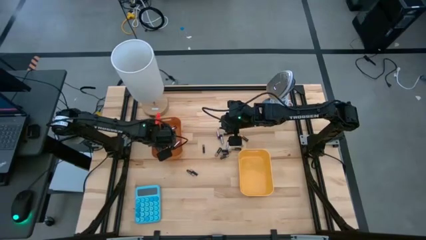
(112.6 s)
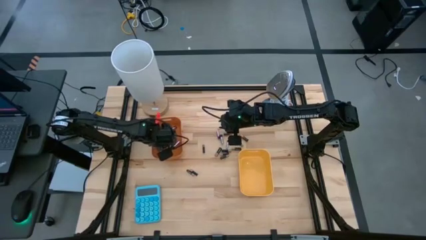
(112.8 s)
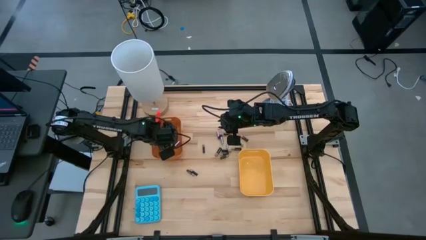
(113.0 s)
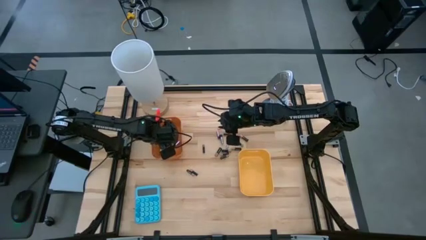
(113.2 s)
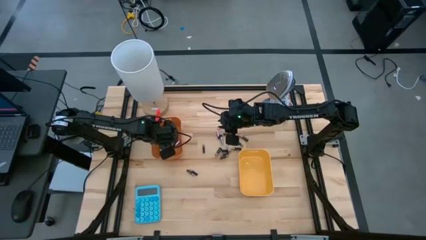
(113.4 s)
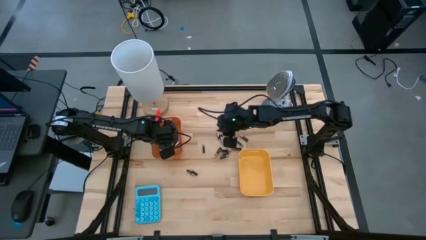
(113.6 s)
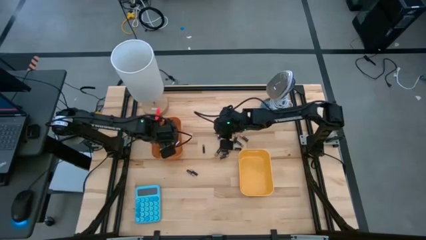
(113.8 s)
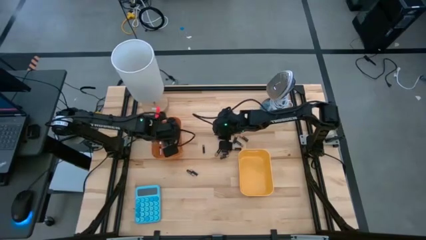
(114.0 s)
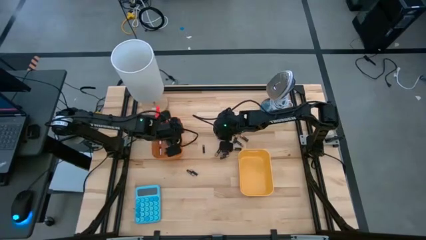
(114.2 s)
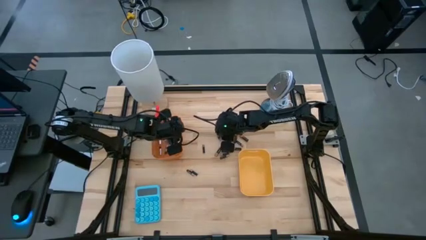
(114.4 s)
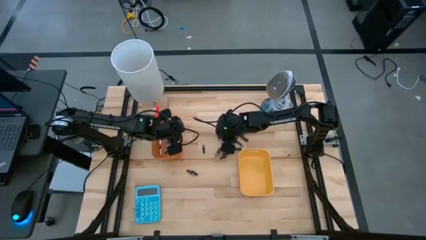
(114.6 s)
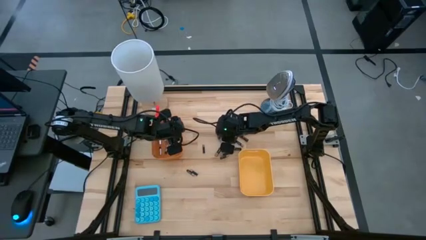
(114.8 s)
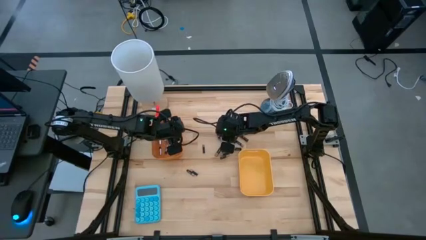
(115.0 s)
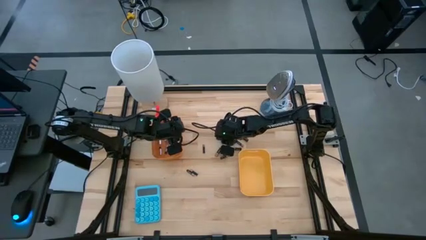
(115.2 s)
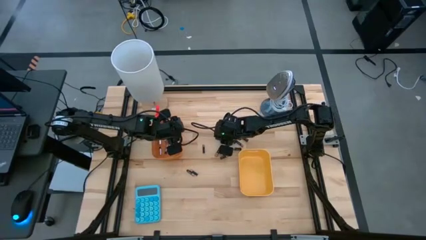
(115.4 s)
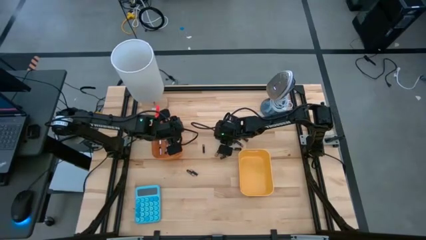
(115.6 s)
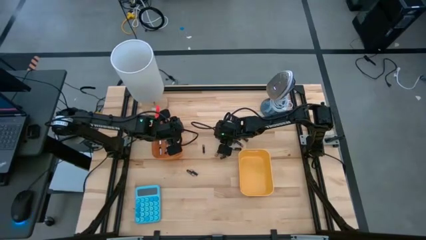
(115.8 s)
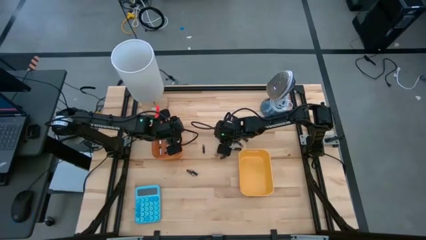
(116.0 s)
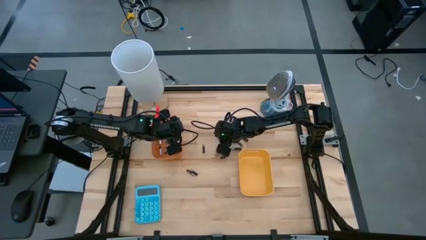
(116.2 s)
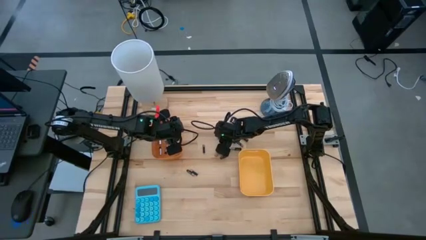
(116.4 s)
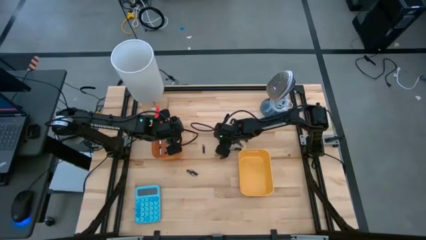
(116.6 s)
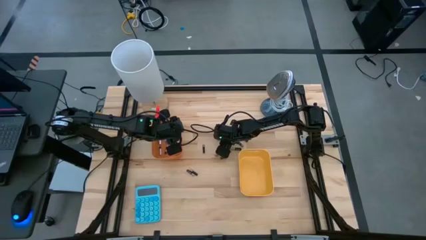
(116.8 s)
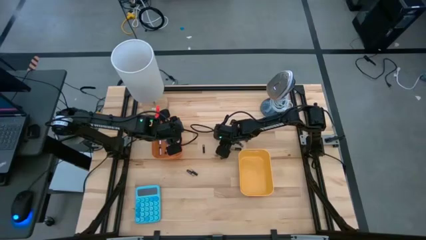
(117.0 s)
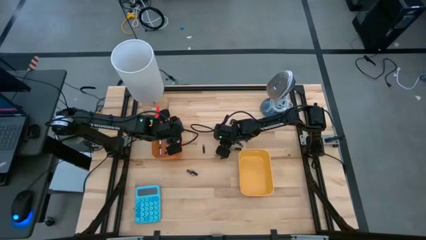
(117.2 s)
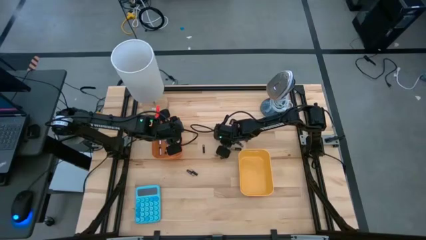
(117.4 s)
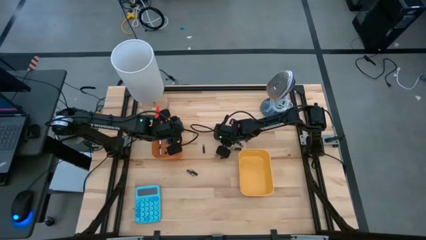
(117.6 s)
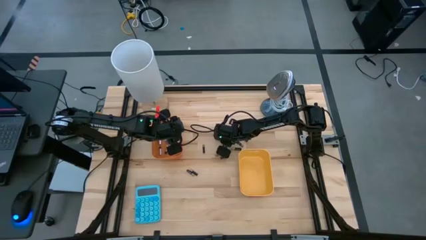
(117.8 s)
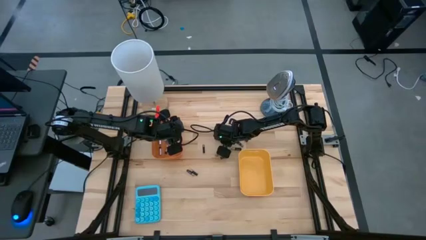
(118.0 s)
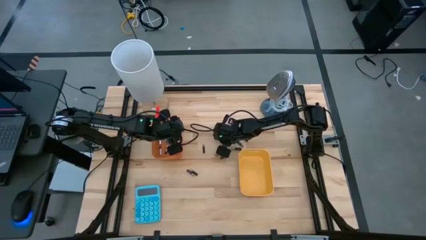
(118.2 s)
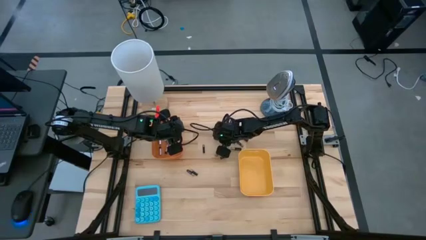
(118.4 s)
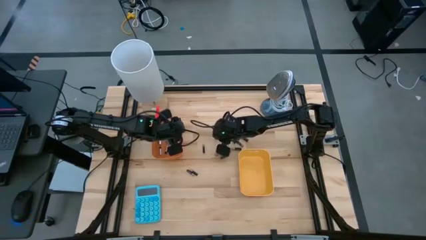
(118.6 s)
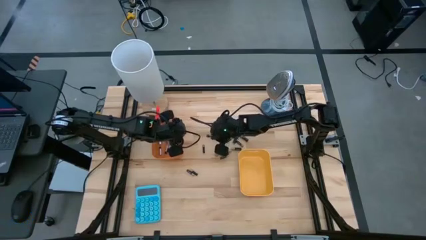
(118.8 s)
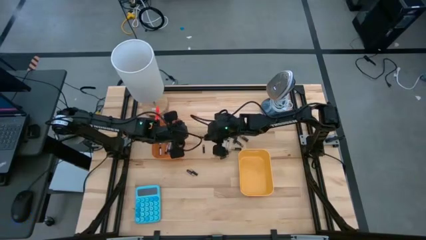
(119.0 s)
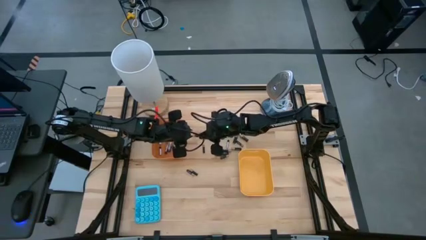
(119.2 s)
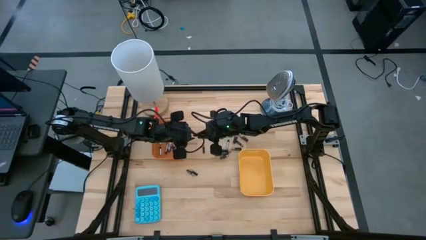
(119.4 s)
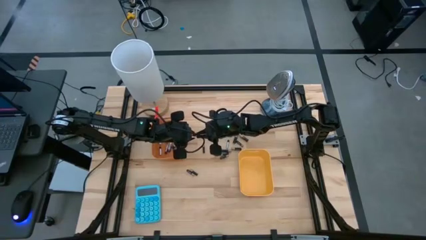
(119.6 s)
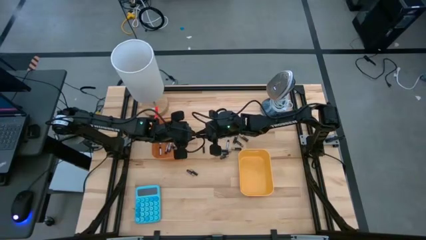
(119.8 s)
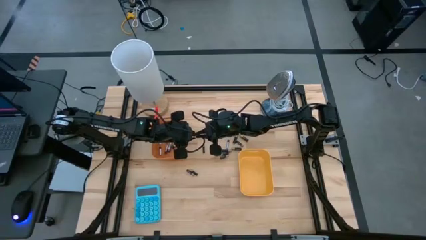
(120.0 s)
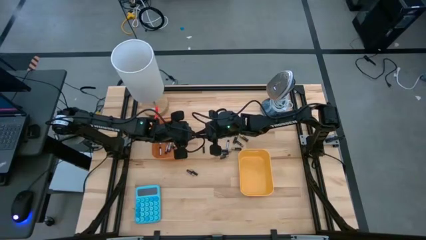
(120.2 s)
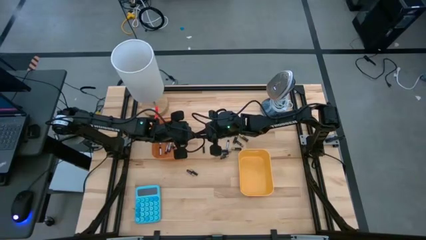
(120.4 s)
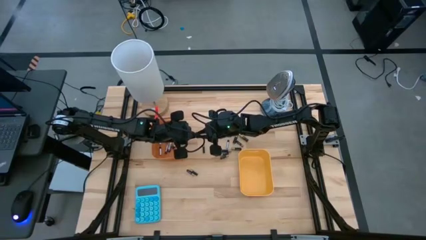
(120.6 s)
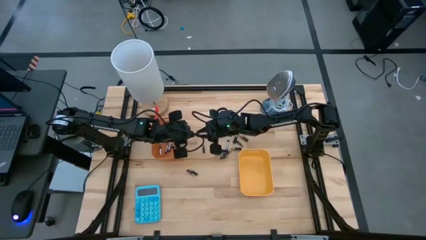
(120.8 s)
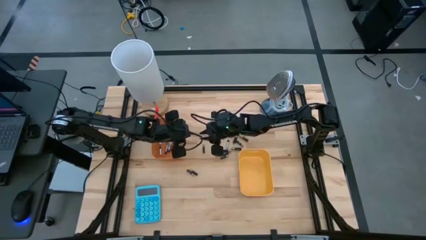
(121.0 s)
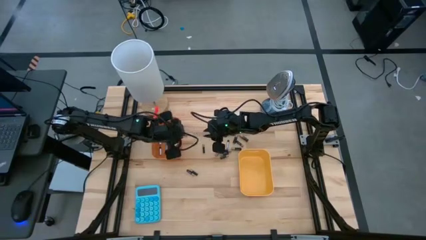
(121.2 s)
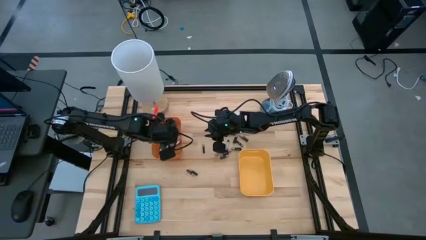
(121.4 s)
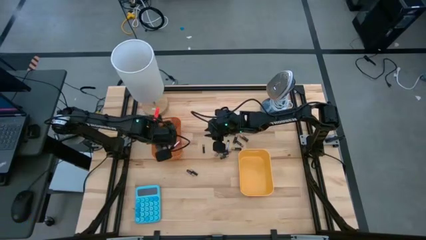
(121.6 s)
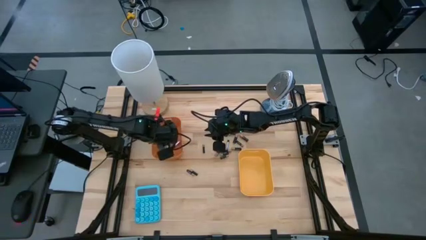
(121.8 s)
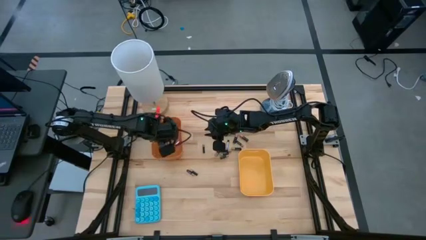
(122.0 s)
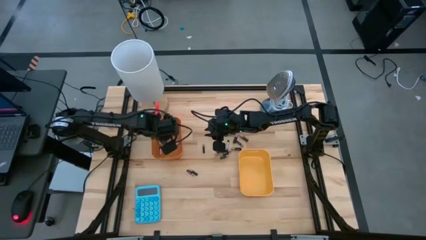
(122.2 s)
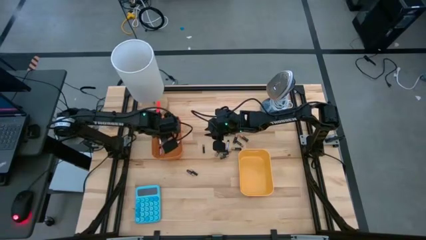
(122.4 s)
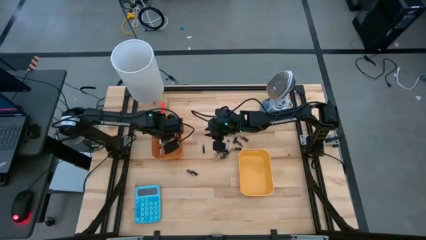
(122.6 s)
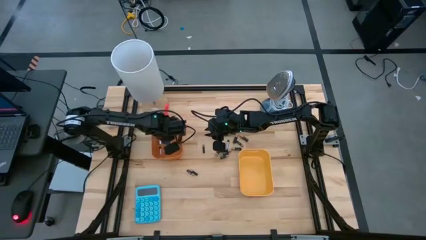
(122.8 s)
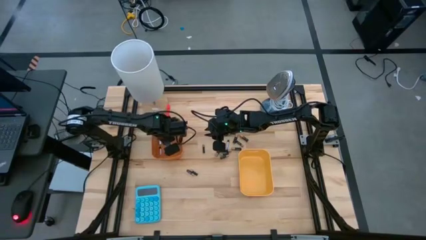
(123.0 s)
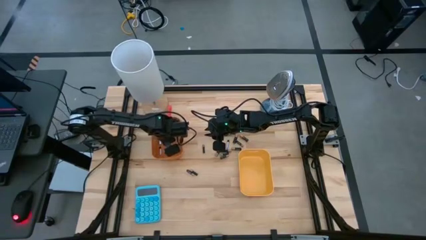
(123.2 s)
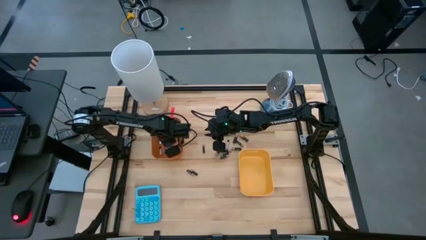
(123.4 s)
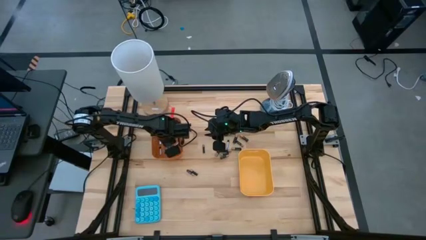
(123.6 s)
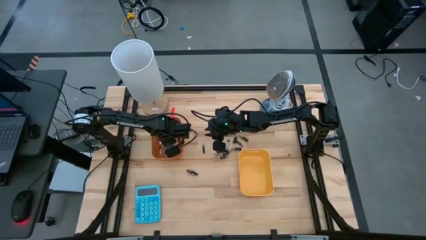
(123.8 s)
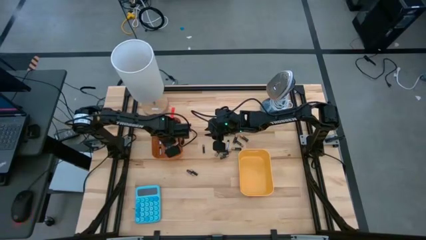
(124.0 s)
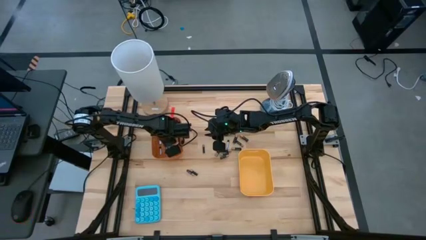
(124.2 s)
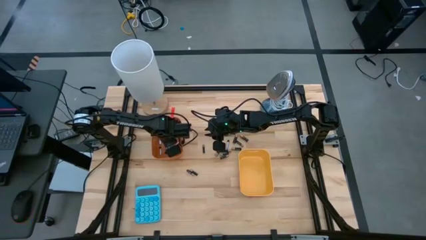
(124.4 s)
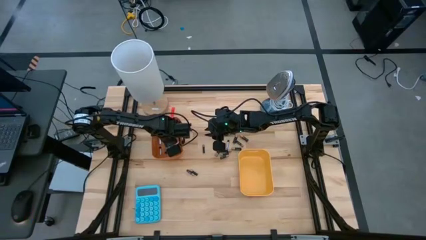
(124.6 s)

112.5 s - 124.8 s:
Task: Sort batteries
Put the silver battery into the orange bin

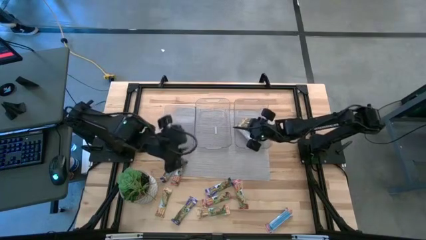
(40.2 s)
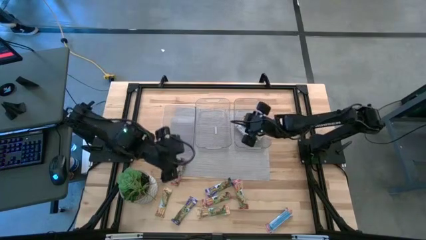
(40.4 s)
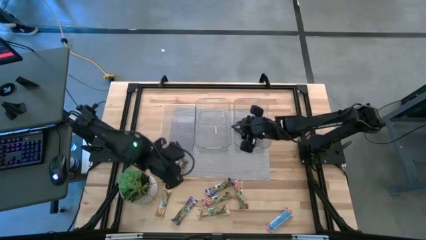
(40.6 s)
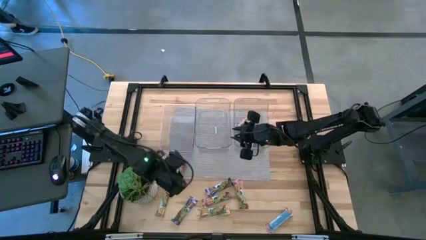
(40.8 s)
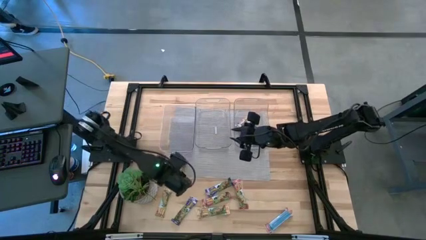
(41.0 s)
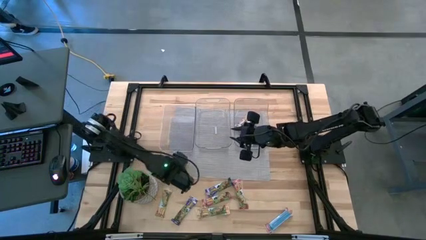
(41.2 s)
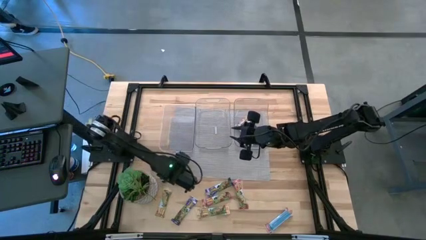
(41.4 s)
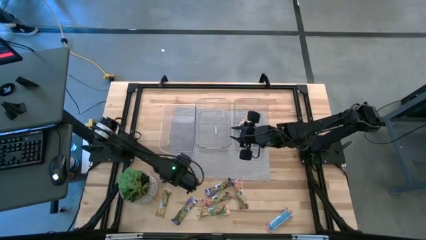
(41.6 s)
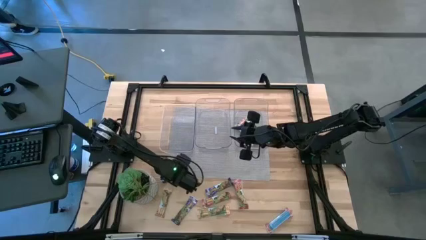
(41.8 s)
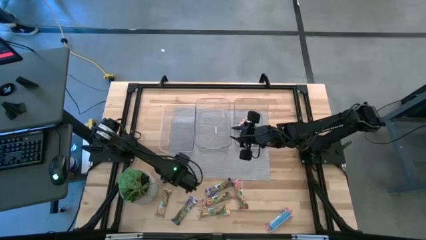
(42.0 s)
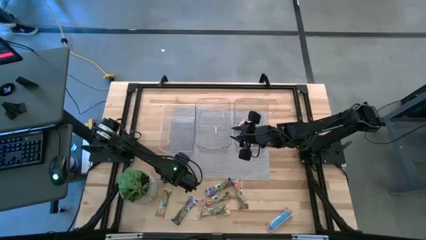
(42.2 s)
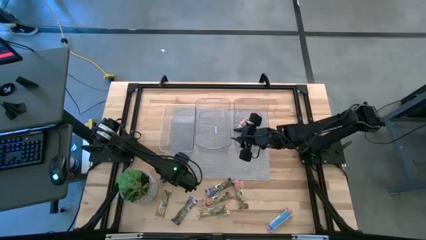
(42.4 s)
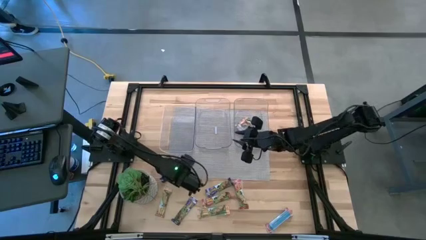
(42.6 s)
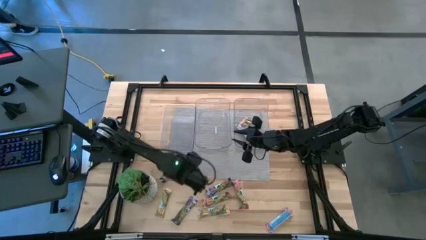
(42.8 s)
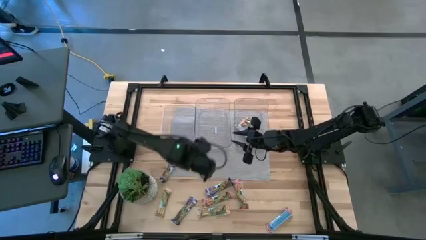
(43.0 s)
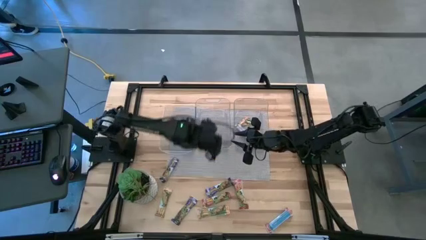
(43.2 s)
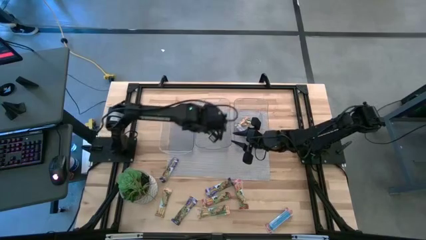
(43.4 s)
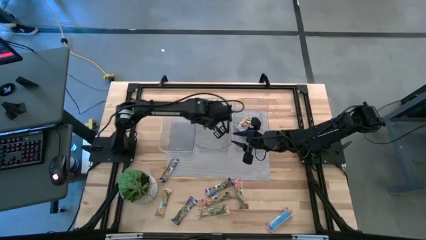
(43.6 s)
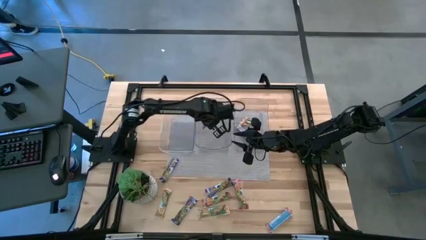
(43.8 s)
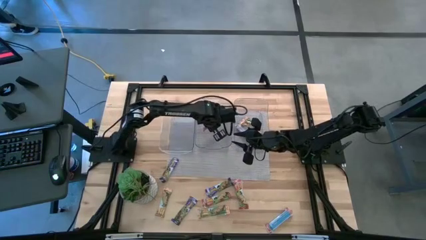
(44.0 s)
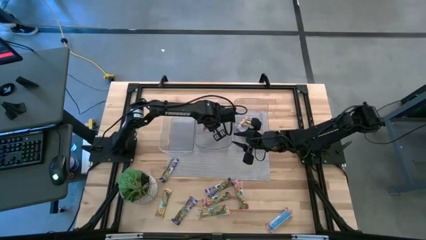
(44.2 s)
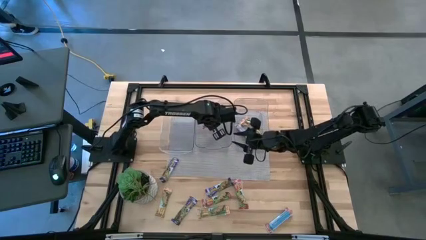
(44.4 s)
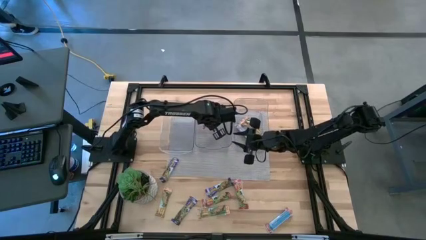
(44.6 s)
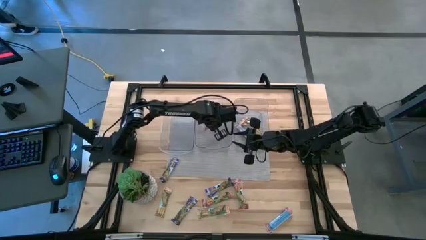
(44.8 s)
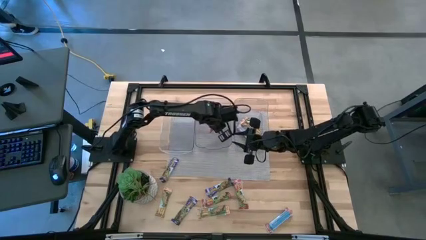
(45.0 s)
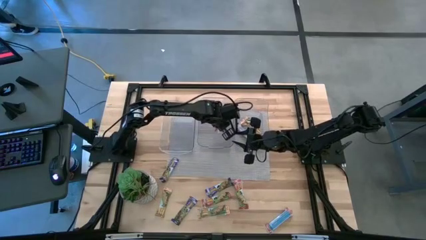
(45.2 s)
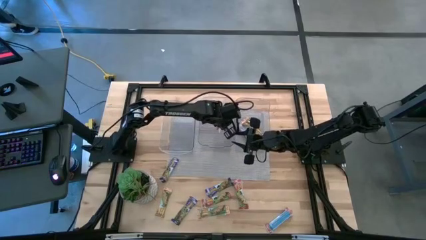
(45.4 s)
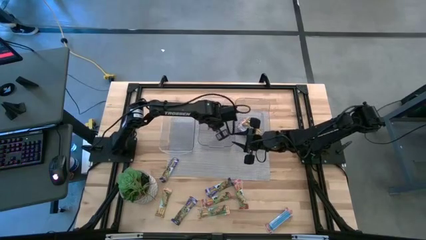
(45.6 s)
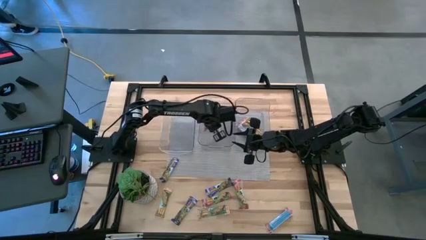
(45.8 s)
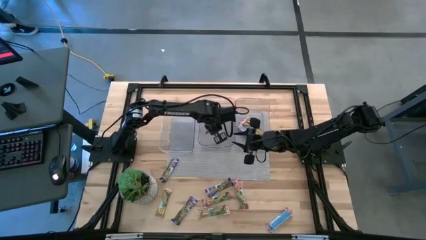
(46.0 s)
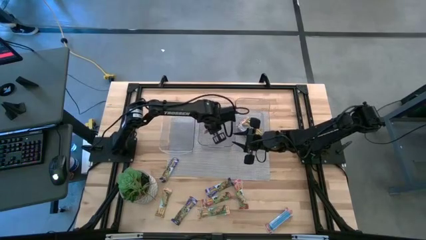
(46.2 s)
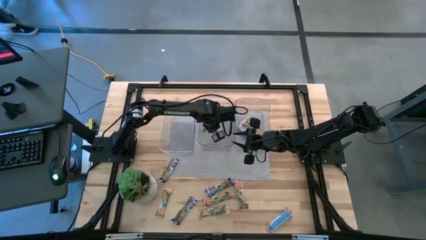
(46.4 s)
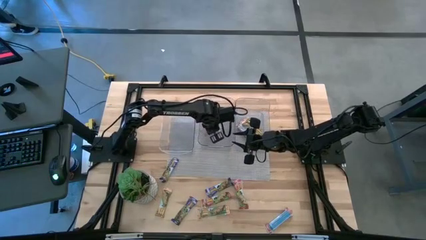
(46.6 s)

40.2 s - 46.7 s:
Task: Pick and place Granola Bars by type
Put the red granola bar into the middle transparent bin
